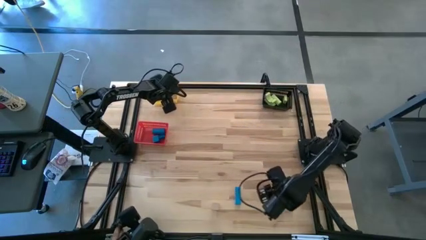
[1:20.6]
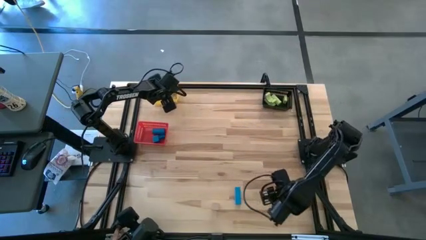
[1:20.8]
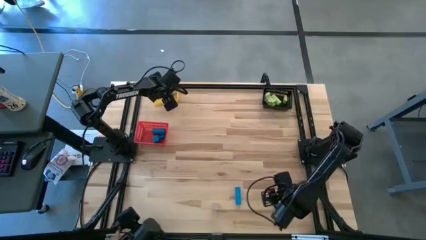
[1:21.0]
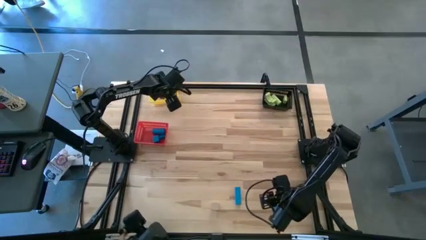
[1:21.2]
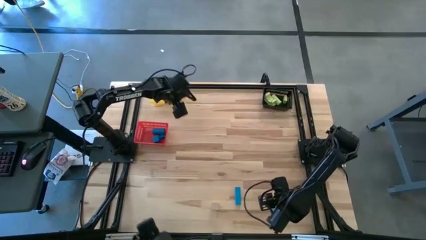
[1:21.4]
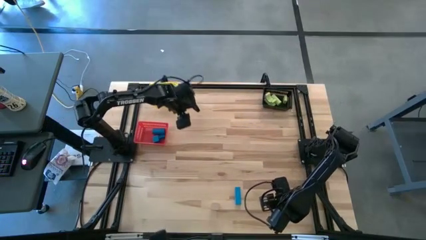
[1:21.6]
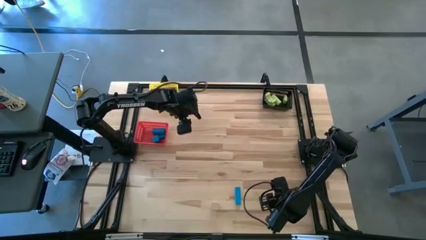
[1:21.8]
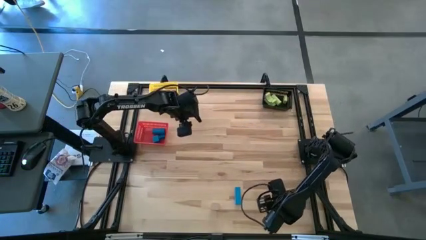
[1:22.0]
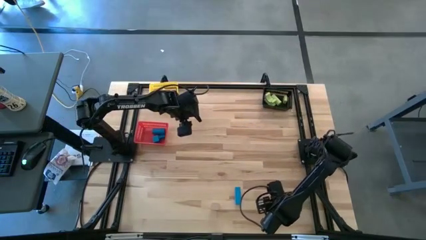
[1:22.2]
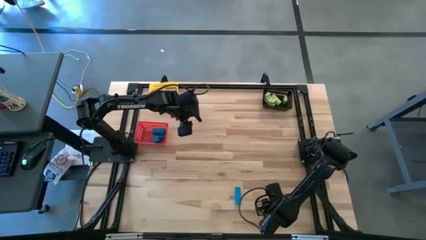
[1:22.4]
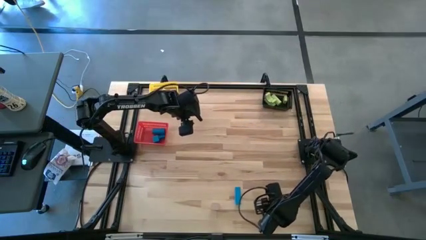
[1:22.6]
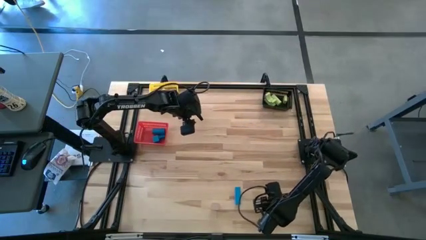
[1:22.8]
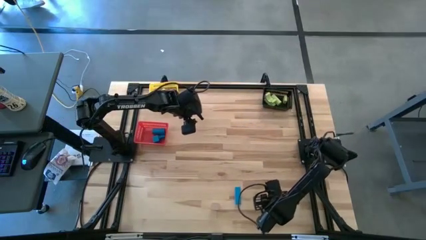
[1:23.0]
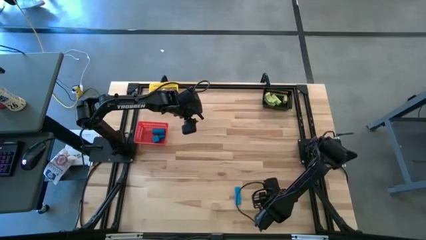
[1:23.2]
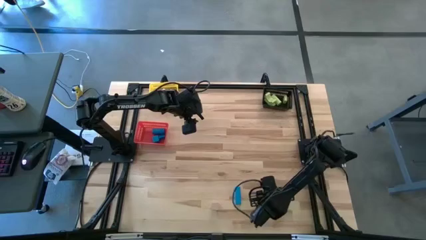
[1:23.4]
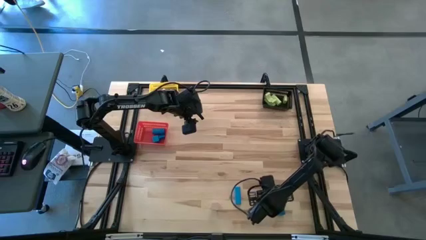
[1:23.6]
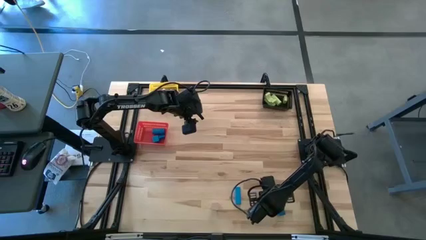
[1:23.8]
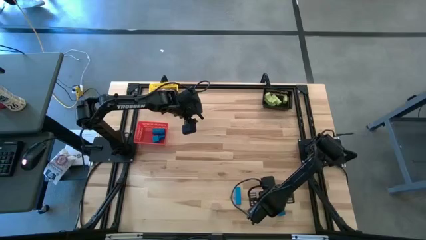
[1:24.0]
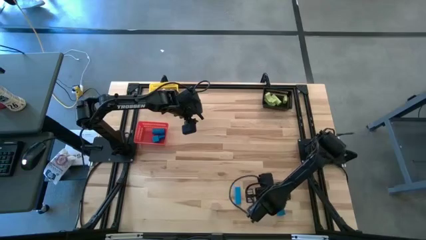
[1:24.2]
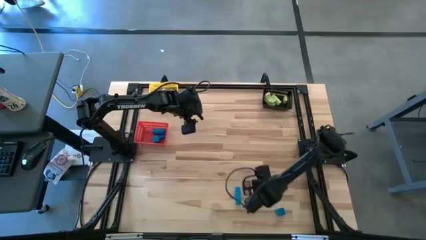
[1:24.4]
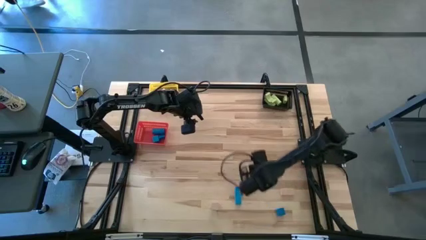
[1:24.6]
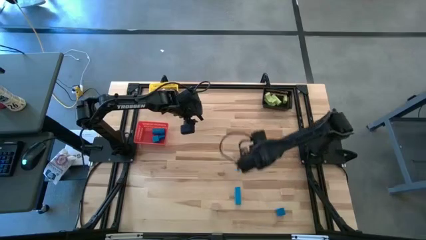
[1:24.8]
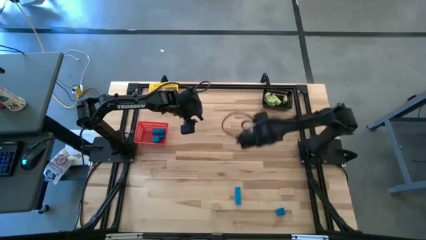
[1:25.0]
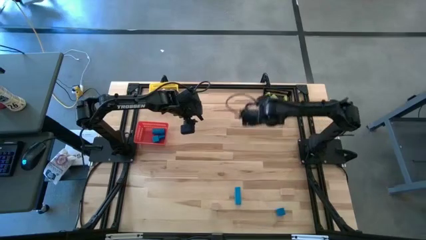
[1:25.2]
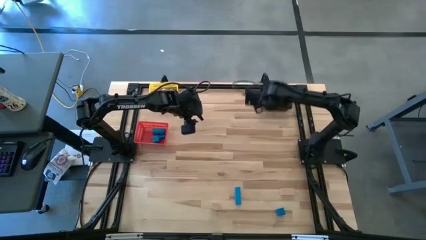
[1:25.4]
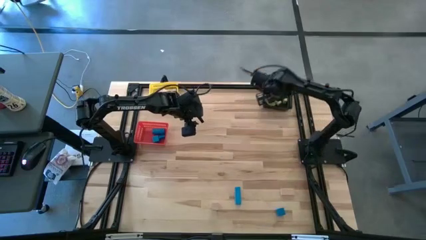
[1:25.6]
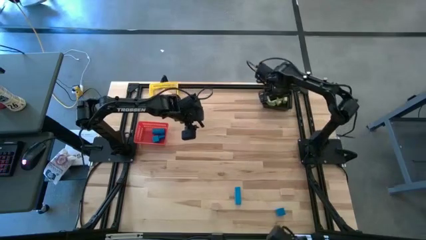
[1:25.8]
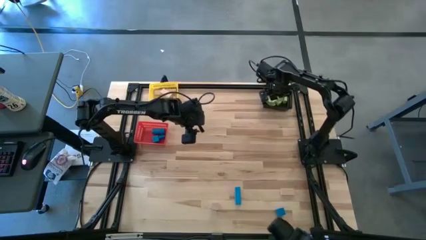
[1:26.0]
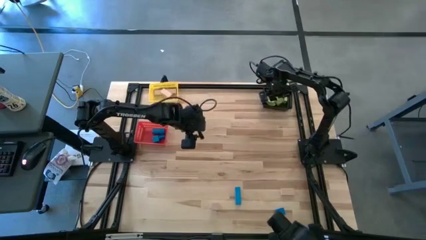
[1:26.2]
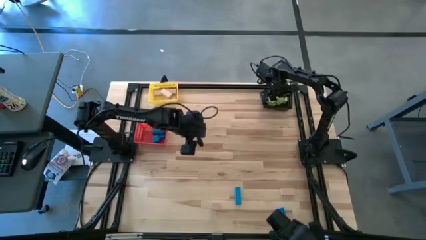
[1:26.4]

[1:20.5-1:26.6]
Task: Sort & place blocks by color
Put the green block into the black bin

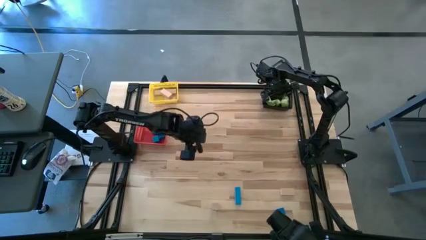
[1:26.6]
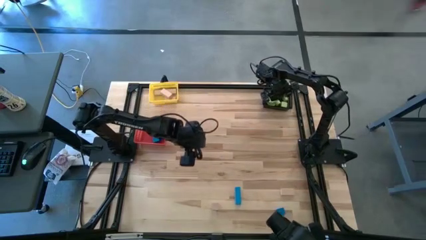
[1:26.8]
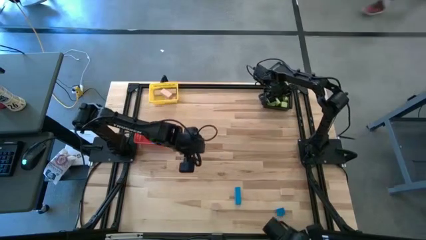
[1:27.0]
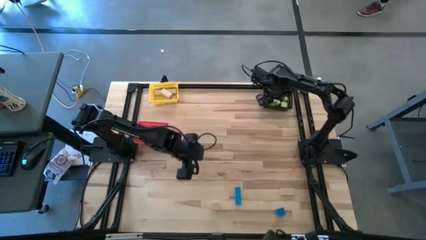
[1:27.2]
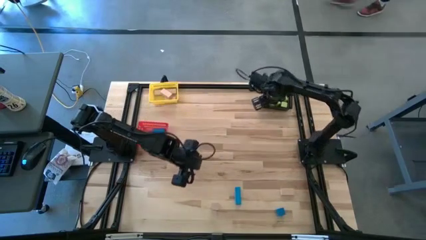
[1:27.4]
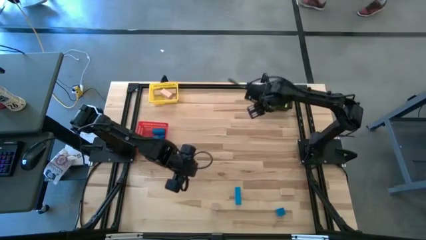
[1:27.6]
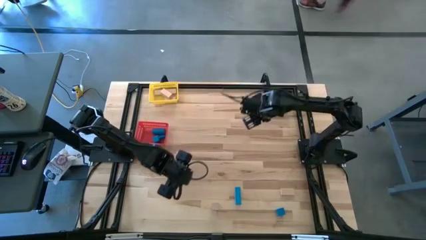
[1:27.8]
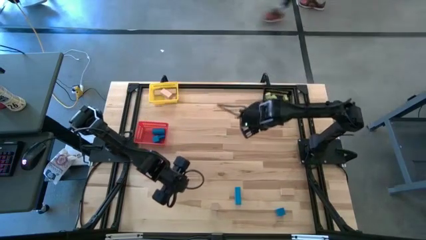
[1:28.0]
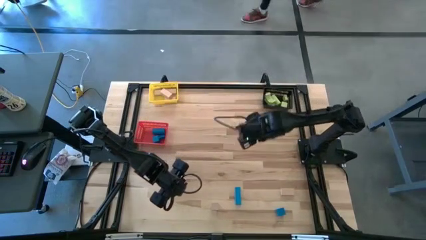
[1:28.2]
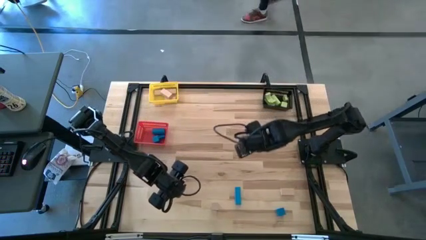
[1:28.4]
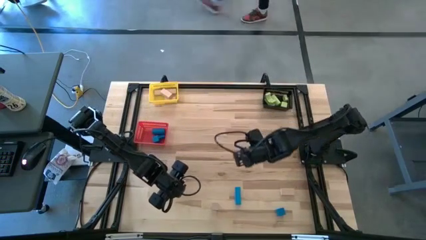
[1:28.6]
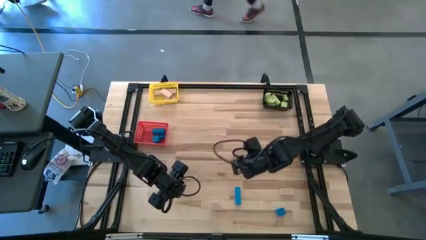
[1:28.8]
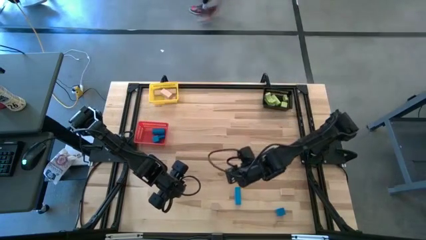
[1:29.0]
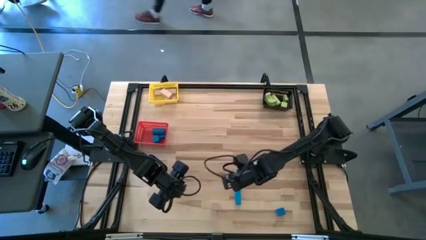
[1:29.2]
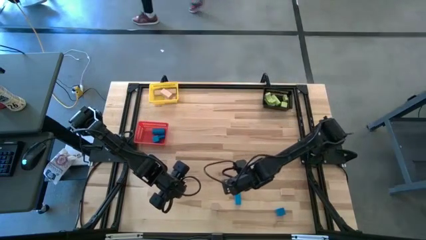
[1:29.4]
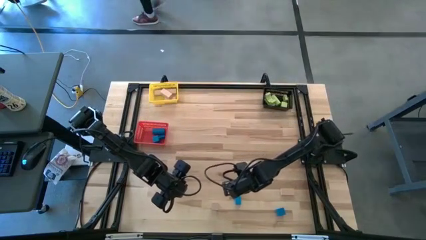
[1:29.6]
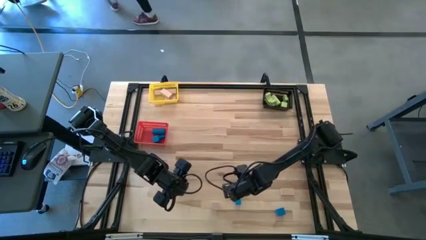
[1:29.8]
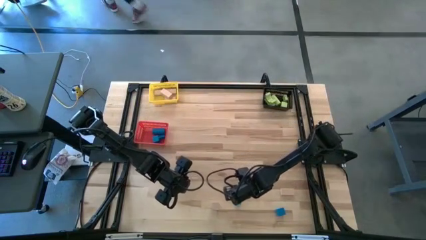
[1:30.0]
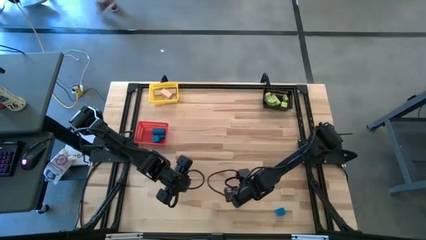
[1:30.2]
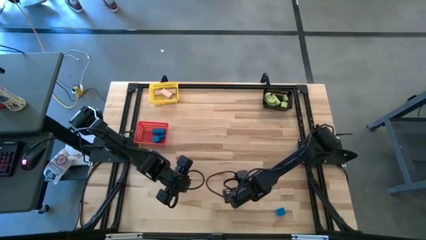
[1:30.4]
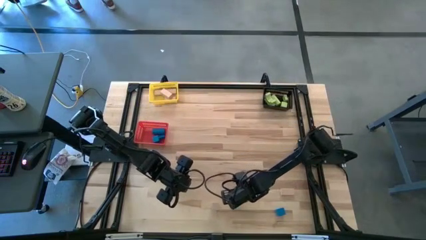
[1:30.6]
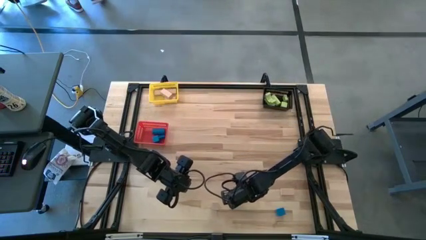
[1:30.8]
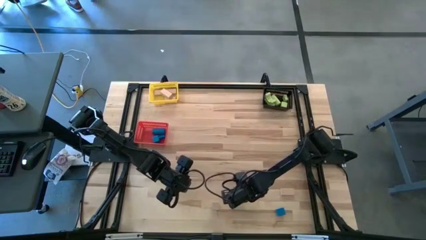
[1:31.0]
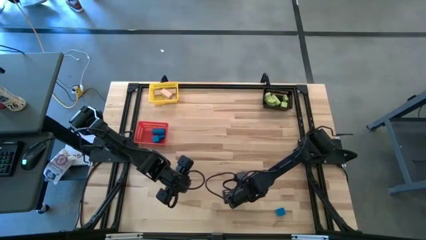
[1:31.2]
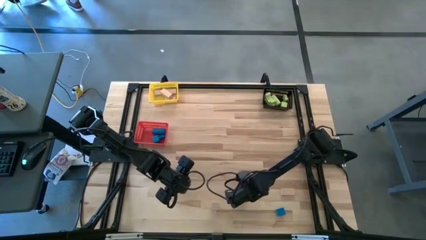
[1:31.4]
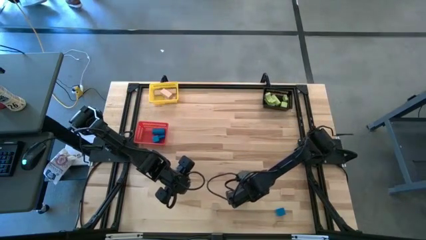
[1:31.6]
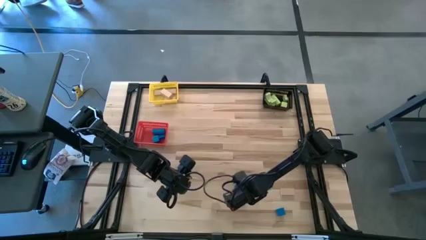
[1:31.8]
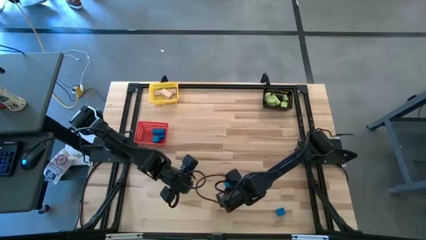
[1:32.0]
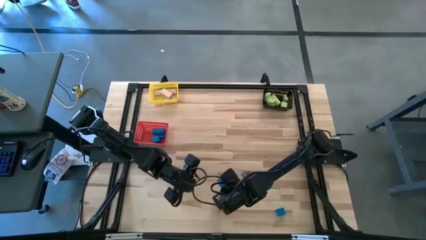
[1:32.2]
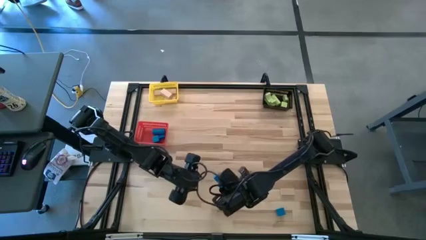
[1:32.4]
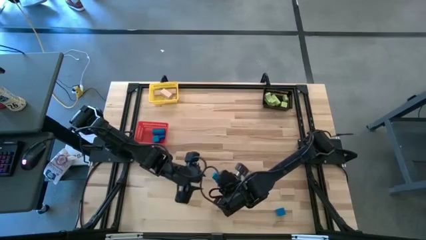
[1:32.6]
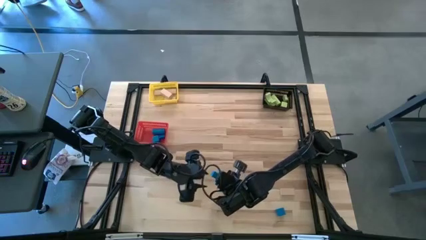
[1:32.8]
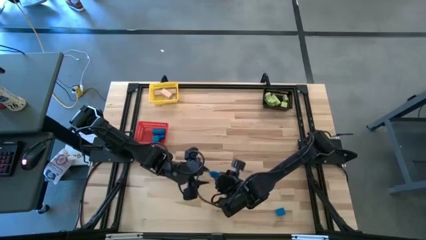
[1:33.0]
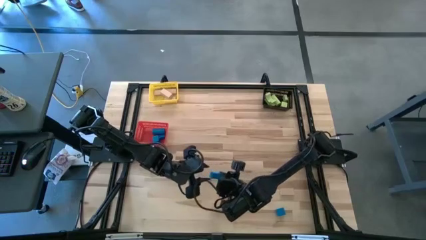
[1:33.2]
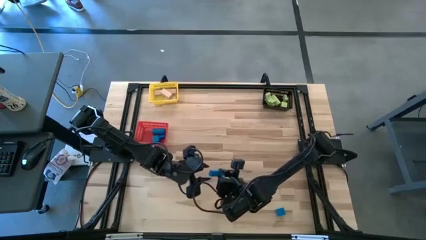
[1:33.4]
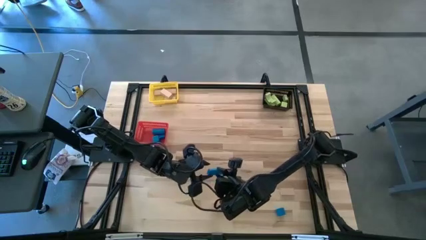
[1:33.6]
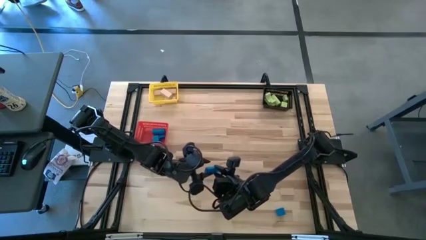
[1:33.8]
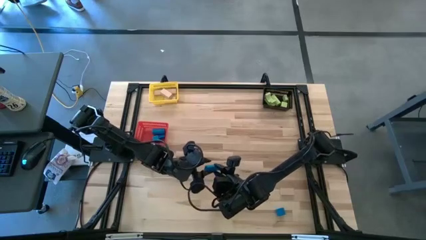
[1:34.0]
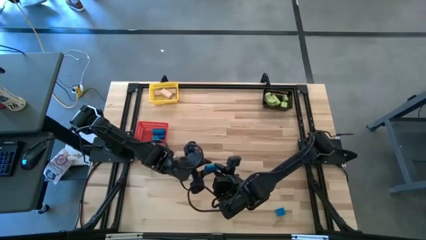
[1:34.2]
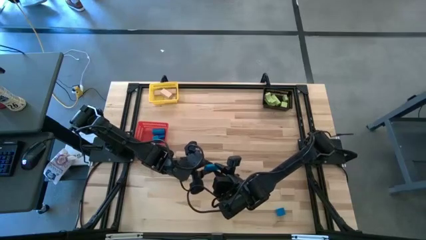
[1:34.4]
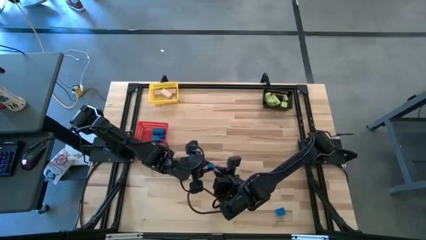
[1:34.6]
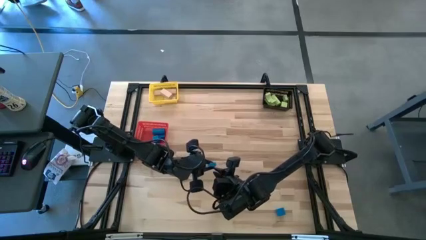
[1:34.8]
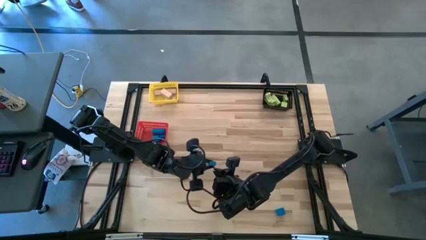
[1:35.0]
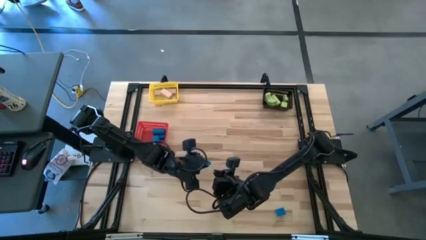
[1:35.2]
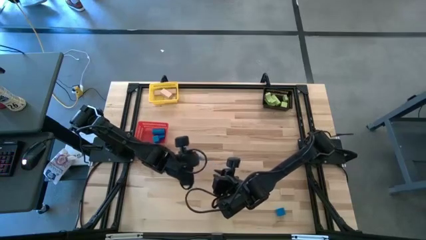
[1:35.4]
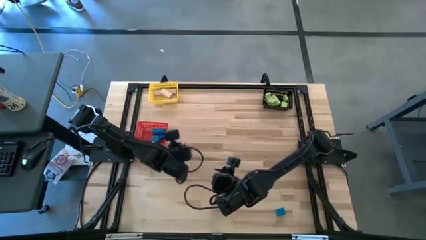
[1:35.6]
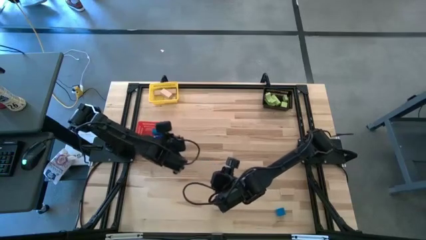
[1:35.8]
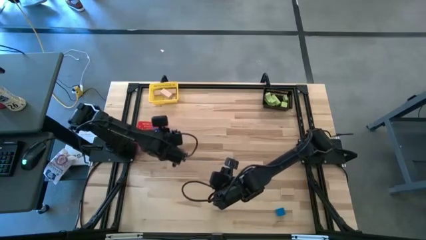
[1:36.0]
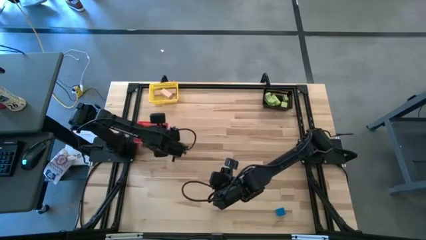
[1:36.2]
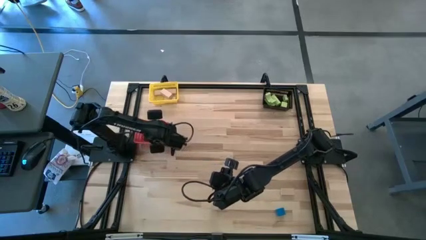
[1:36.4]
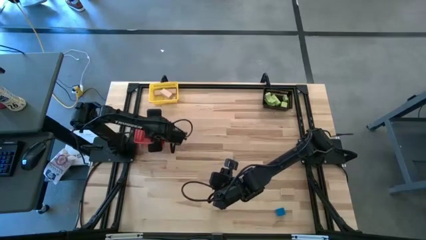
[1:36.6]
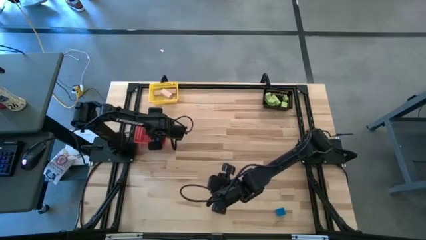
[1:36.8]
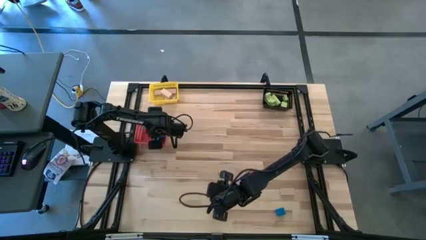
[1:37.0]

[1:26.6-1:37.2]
Put the blue block into the red bin
